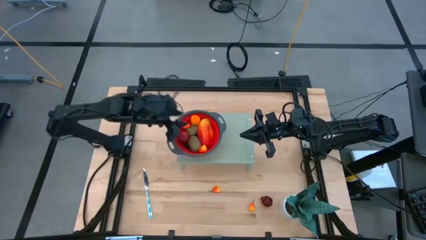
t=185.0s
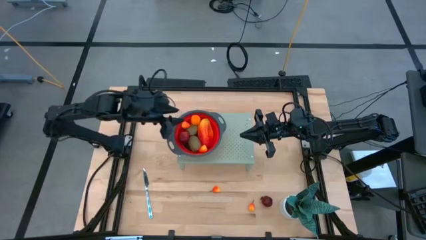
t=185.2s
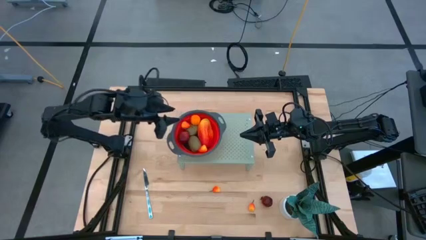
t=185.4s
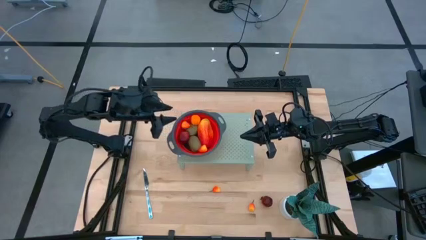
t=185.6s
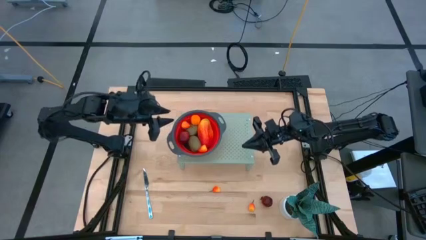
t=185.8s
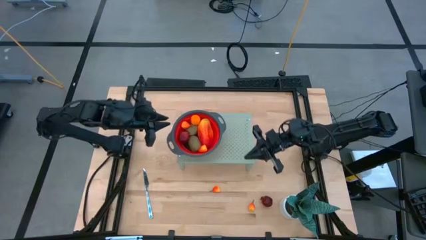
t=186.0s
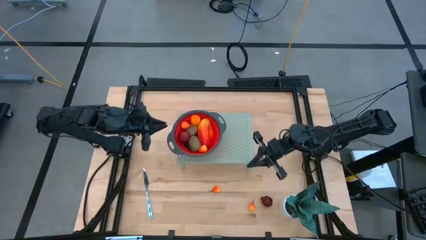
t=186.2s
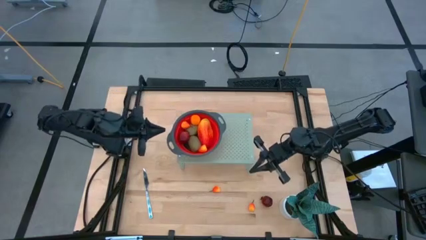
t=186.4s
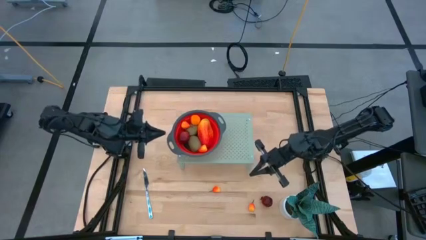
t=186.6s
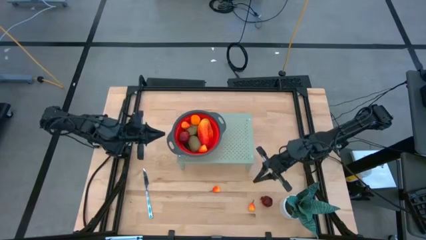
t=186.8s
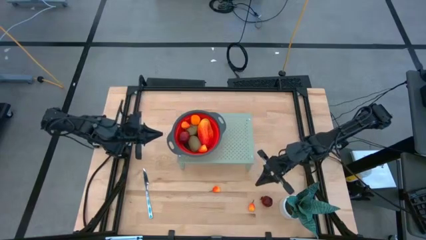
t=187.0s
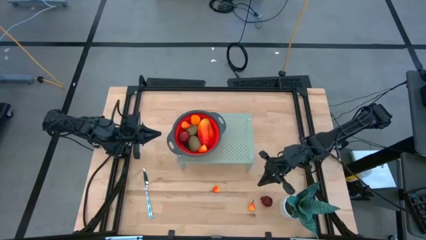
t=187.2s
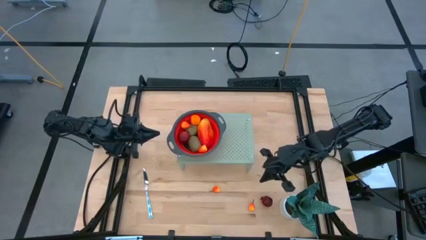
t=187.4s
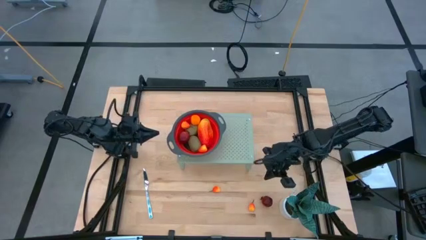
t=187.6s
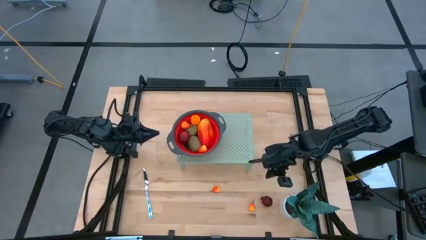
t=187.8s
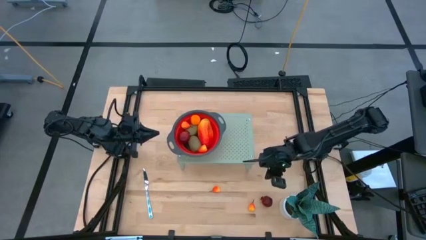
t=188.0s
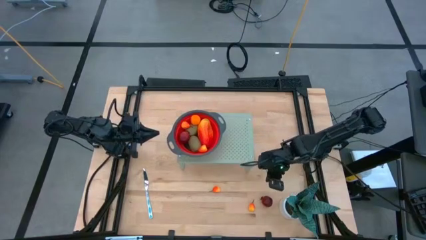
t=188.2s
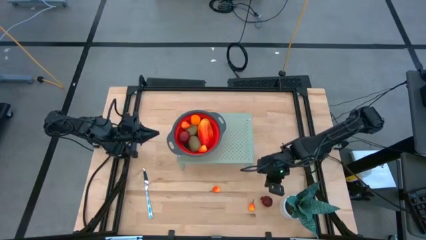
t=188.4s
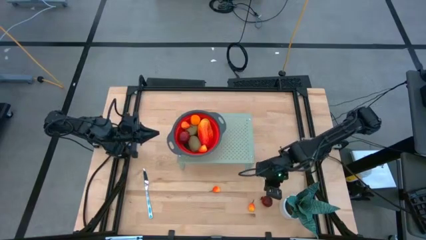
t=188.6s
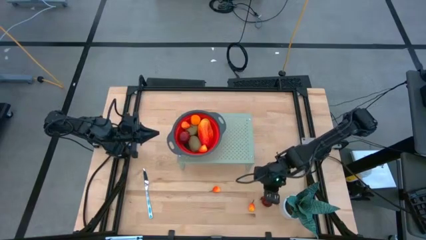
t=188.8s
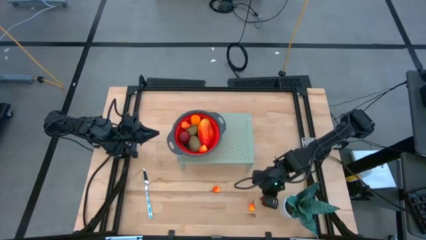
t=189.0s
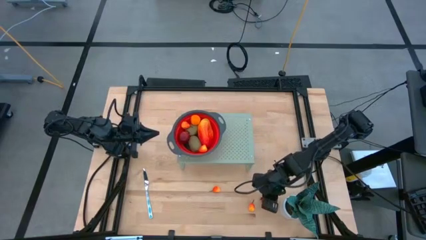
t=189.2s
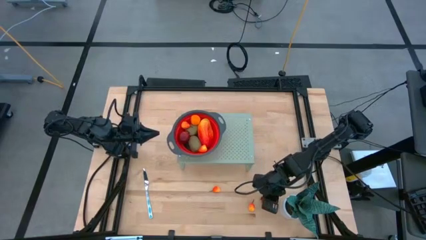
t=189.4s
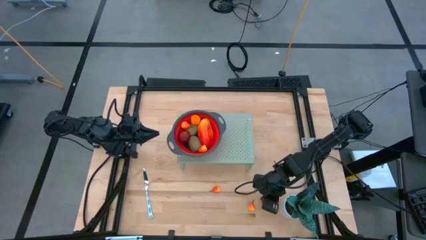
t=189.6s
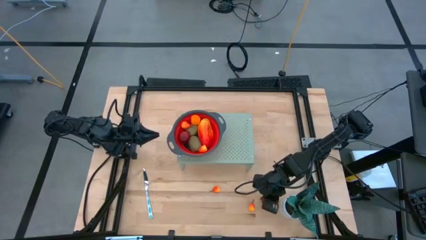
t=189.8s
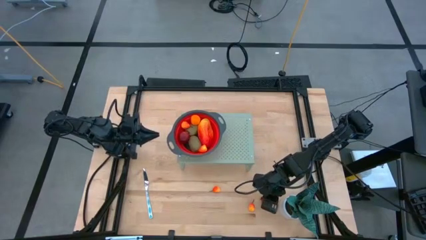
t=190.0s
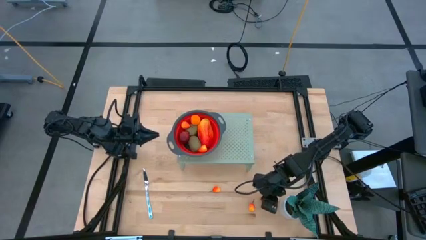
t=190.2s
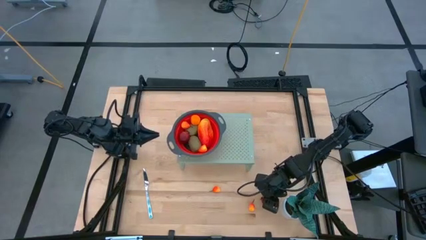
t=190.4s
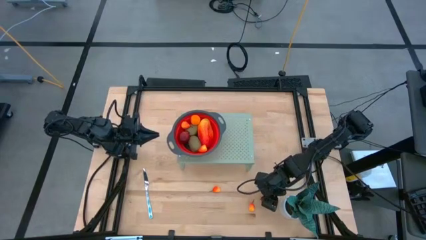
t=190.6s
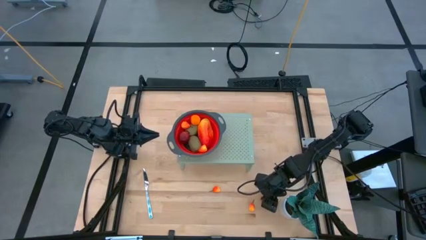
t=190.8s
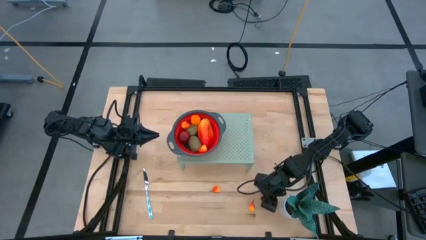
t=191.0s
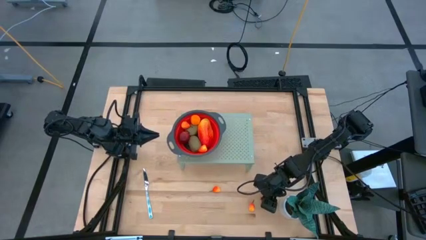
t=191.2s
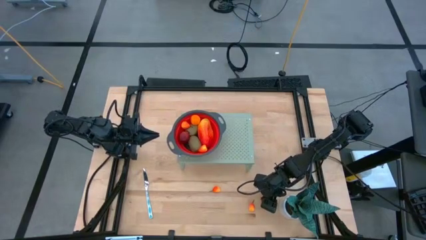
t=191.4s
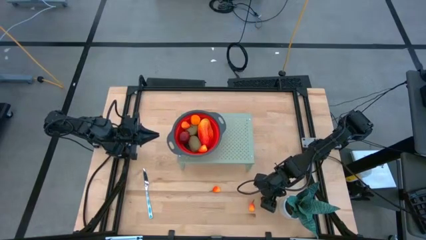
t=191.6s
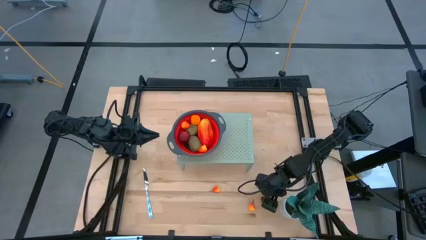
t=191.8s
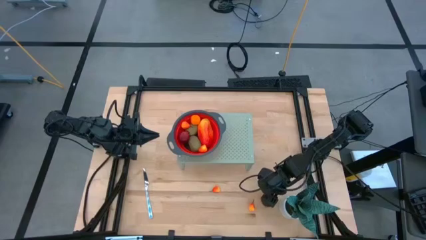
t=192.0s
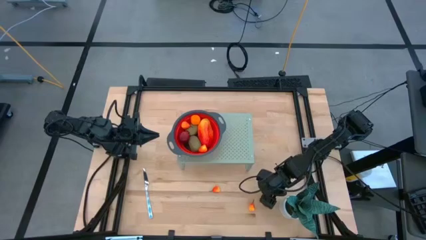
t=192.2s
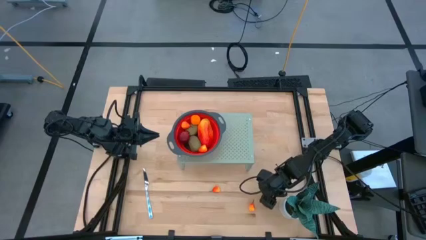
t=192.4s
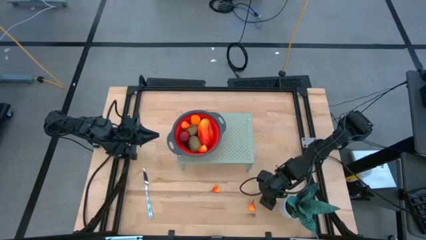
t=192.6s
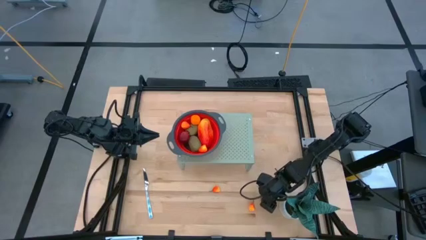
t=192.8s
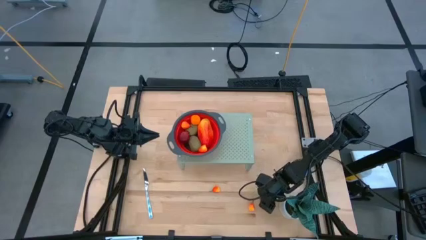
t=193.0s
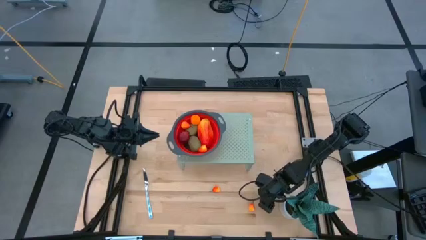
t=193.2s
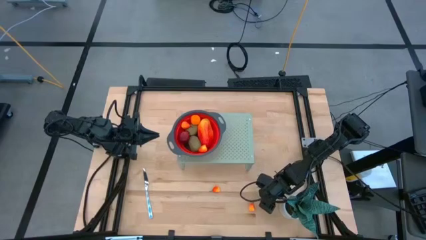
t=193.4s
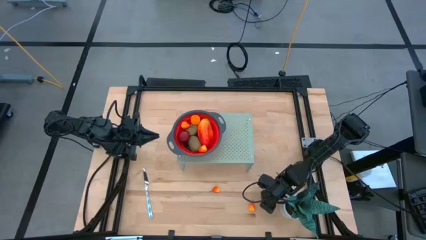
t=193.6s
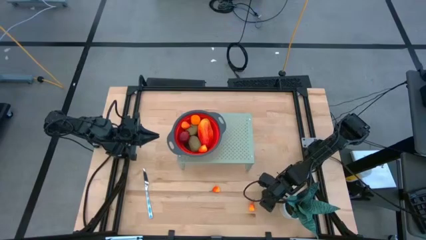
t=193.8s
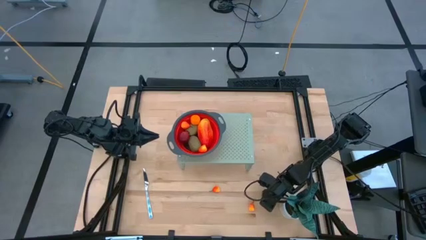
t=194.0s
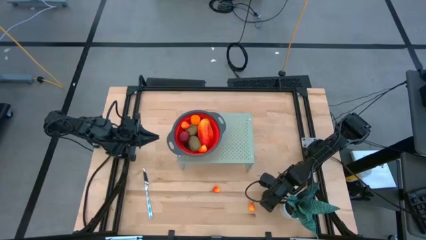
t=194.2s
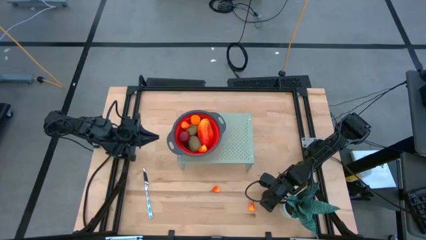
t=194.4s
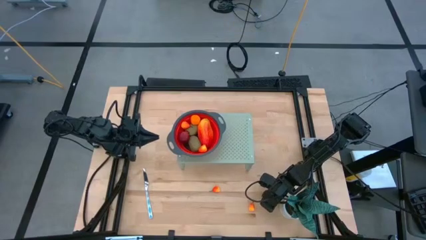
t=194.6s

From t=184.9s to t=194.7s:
Task: Pick & Place Fruit
Put the pomegranate fruit into the strainer

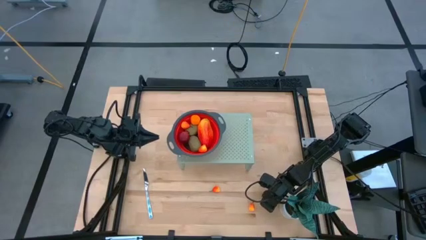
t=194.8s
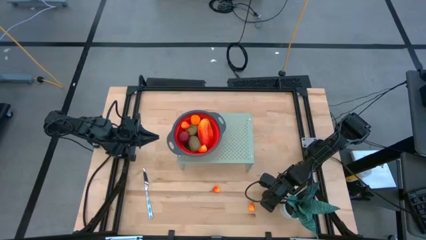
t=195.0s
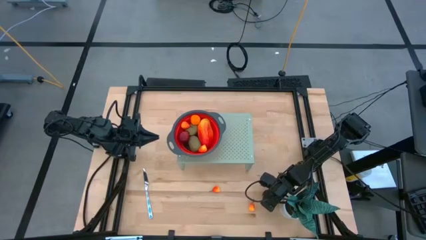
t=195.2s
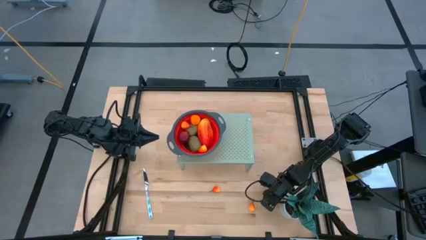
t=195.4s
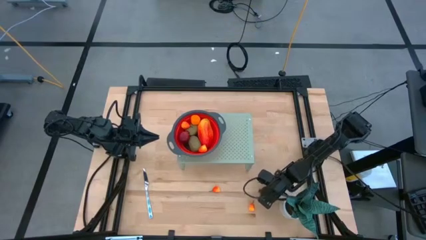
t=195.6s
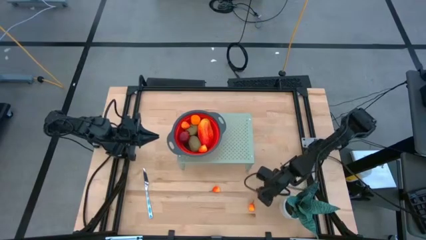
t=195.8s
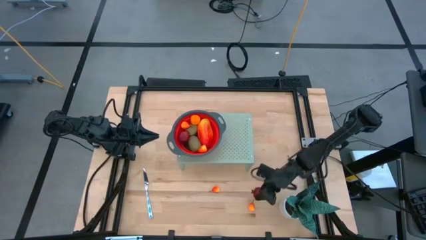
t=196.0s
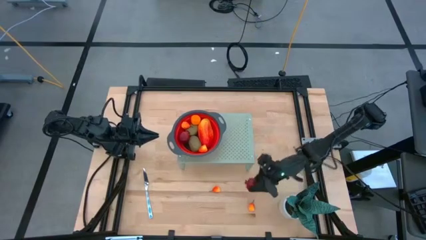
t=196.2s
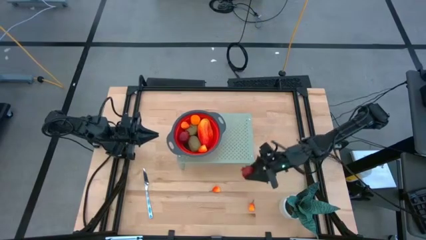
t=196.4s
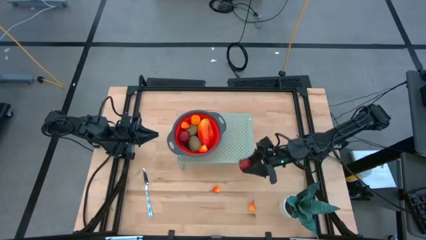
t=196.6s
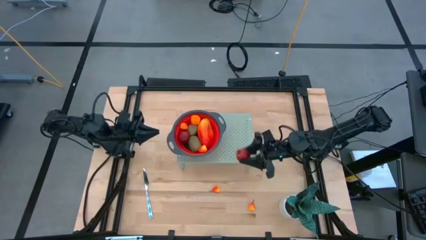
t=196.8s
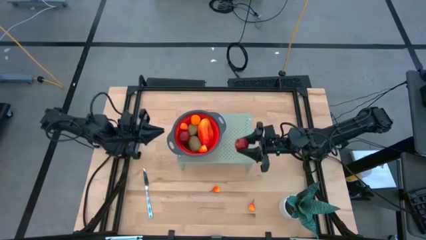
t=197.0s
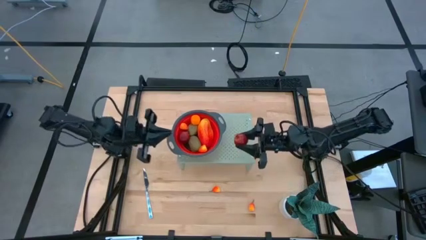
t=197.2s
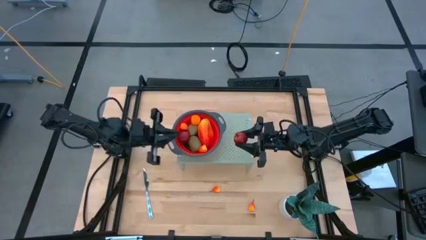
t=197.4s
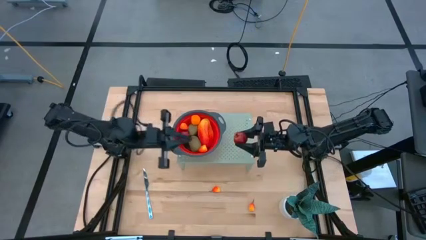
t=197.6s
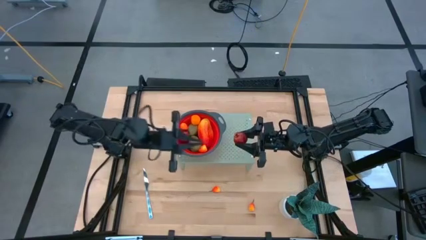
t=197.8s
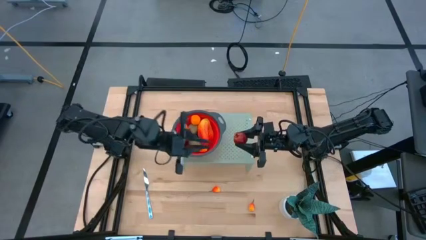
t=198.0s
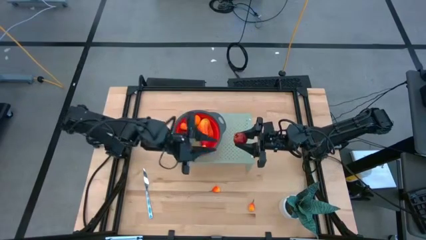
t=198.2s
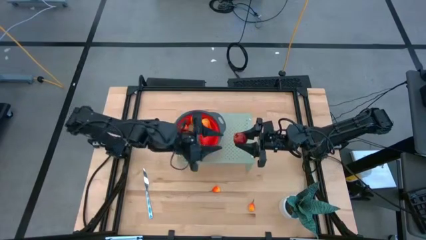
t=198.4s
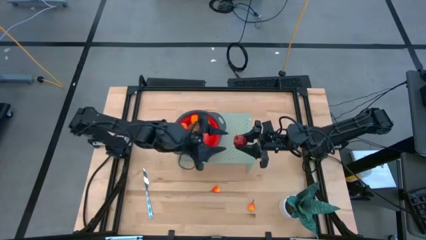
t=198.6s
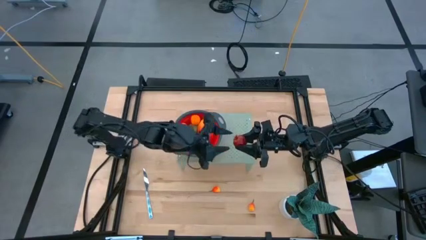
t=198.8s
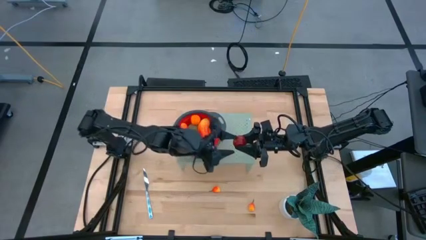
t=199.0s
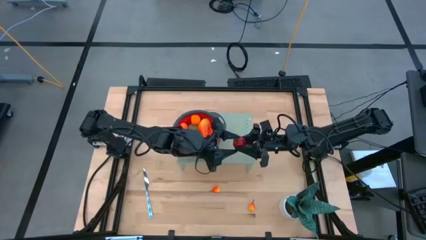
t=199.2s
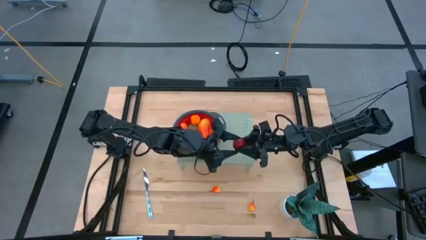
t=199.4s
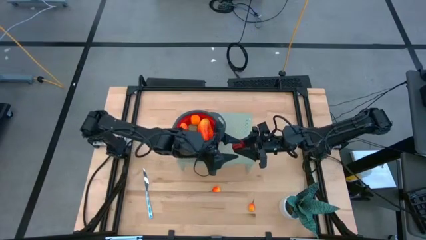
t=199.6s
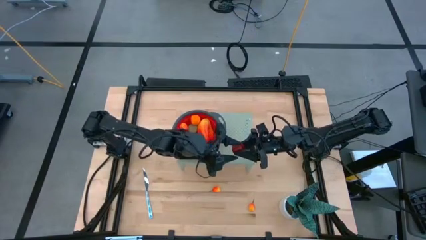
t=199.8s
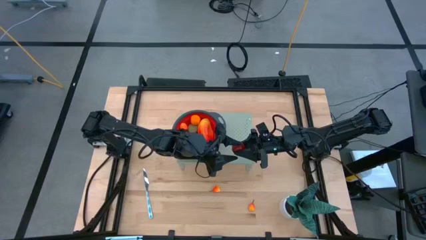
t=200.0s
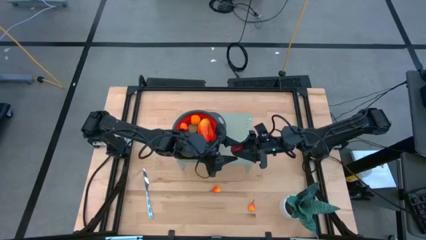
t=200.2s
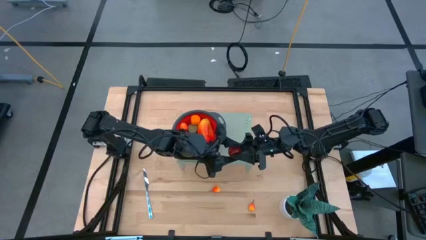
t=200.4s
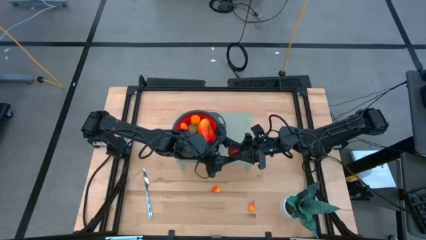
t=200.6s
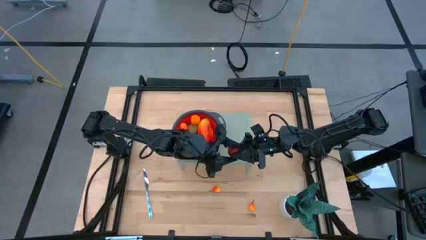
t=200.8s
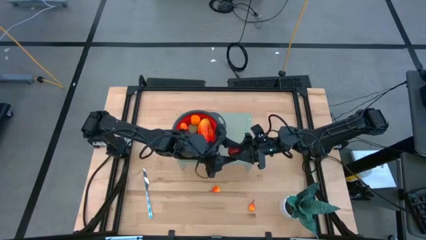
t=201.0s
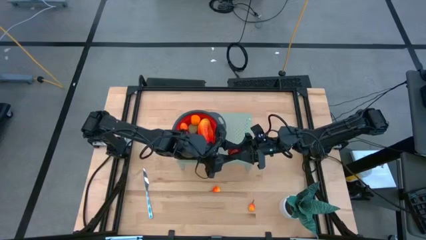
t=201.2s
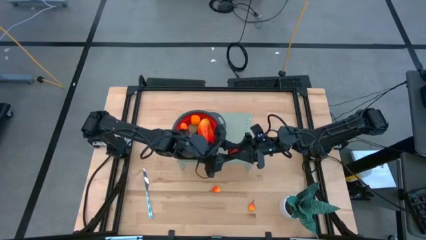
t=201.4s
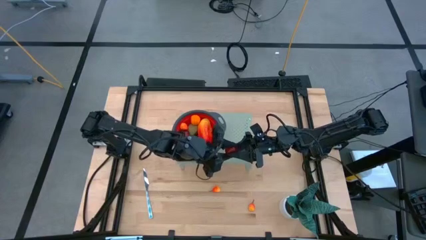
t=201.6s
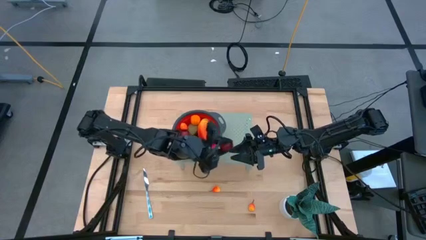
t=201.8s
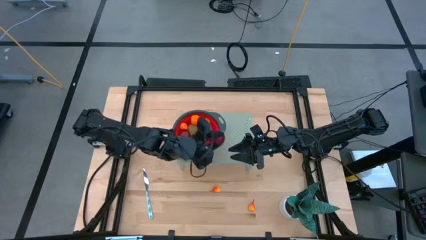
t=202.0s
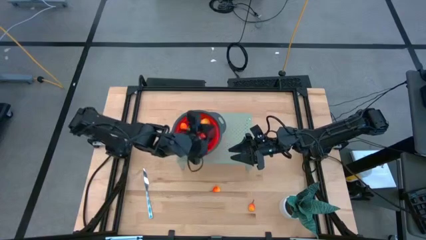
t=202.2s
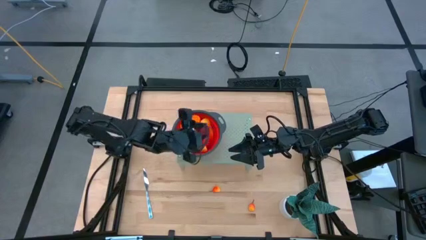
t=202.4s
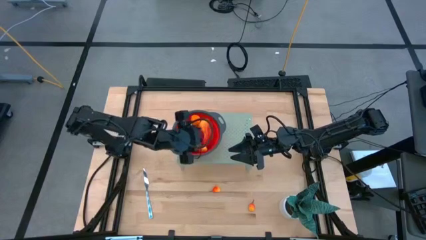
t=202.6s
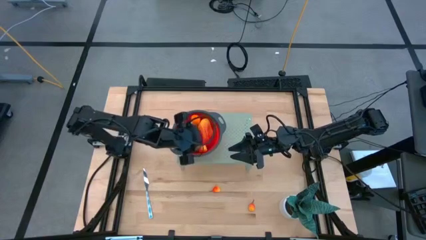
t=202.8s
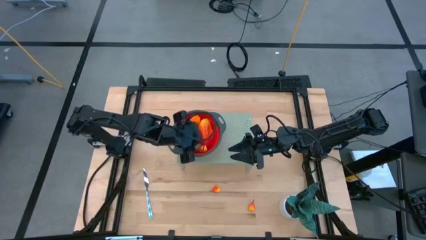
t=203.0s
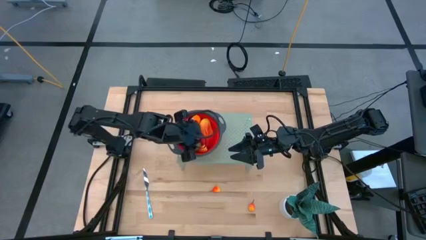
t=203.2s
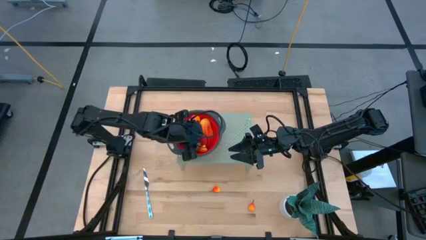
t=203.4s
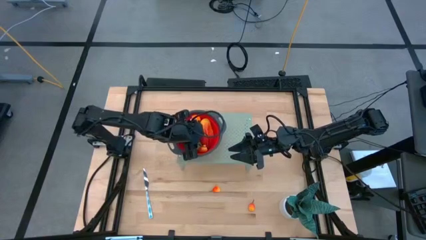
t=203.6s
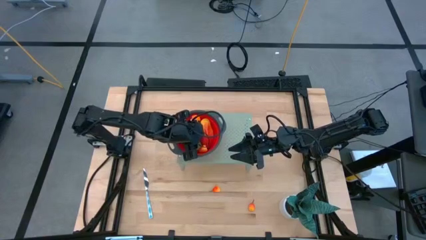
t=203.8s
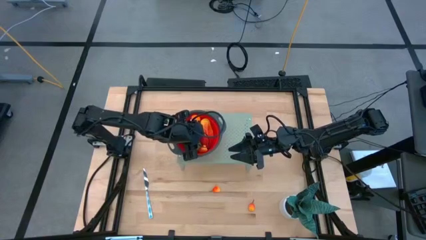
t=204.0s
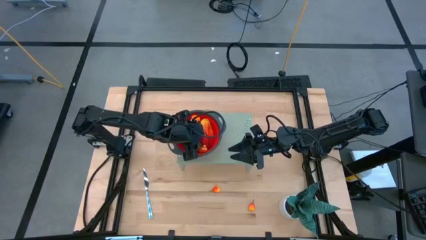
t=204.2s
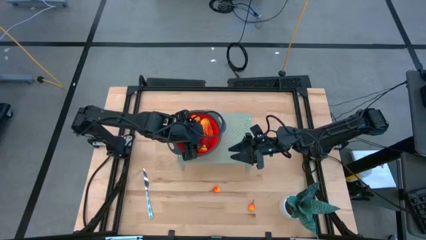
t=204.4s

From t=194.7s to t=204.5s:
Put the pomegranate fruit into the strainer
